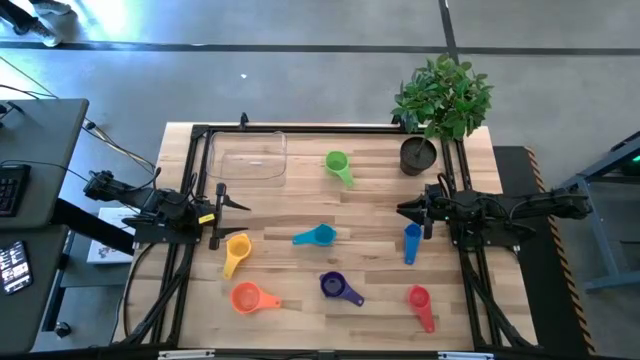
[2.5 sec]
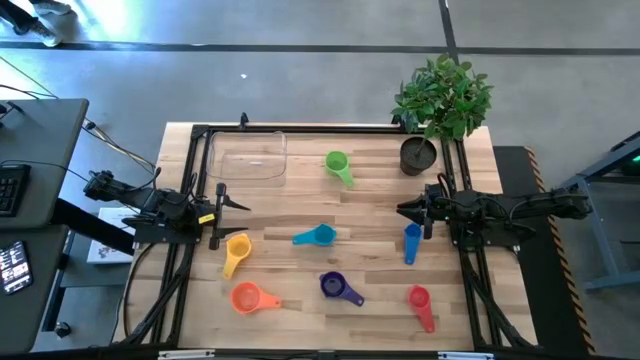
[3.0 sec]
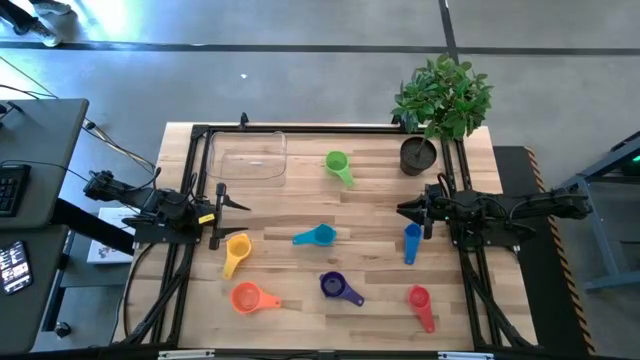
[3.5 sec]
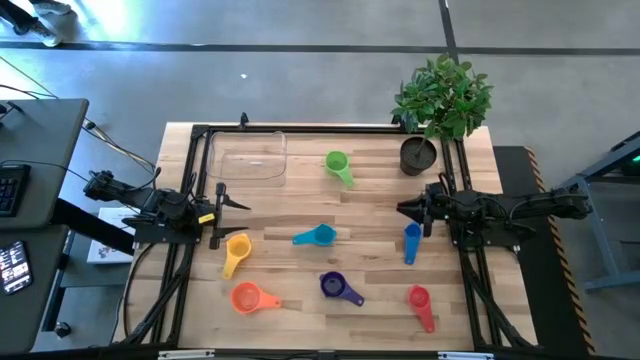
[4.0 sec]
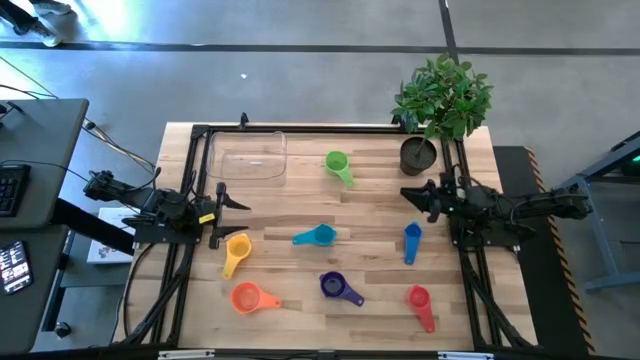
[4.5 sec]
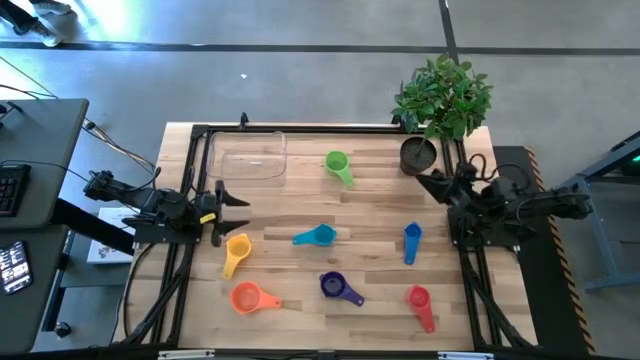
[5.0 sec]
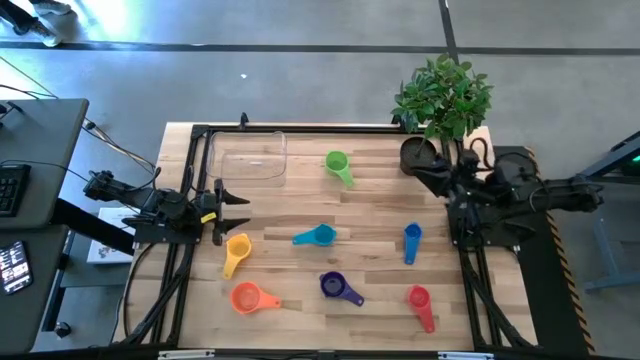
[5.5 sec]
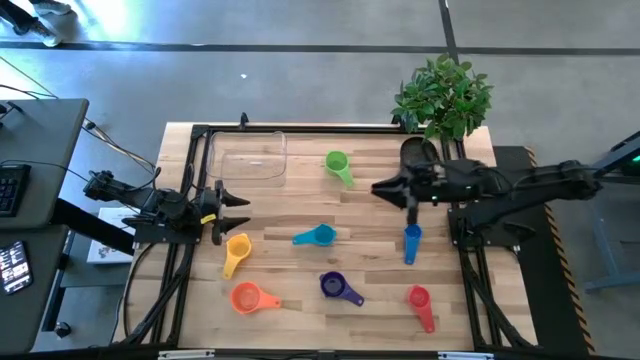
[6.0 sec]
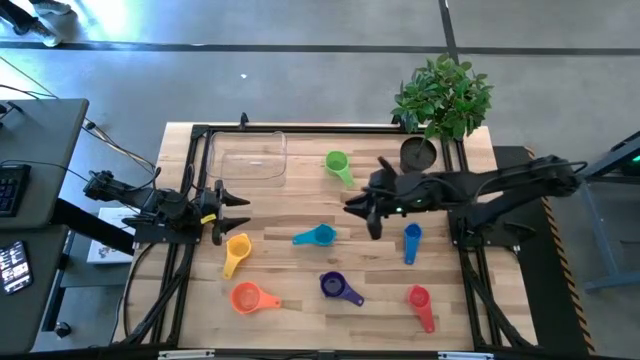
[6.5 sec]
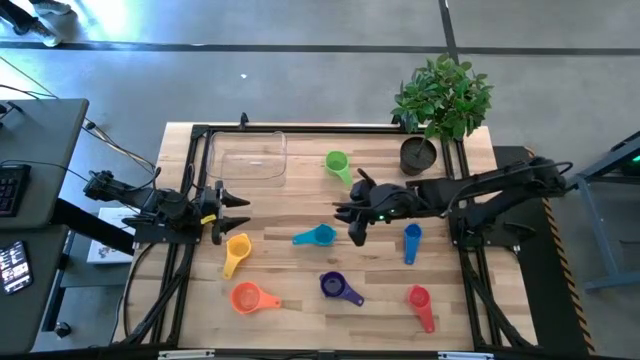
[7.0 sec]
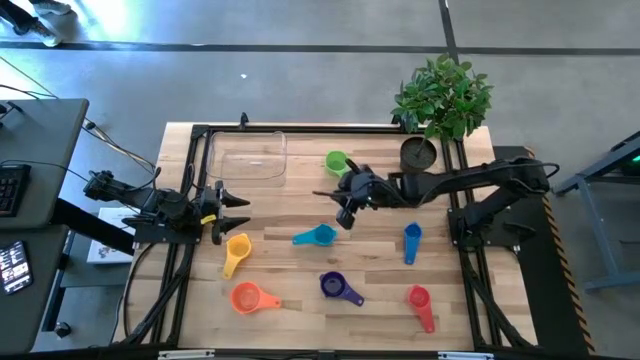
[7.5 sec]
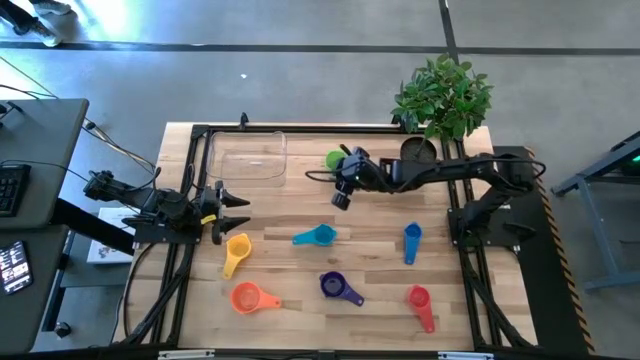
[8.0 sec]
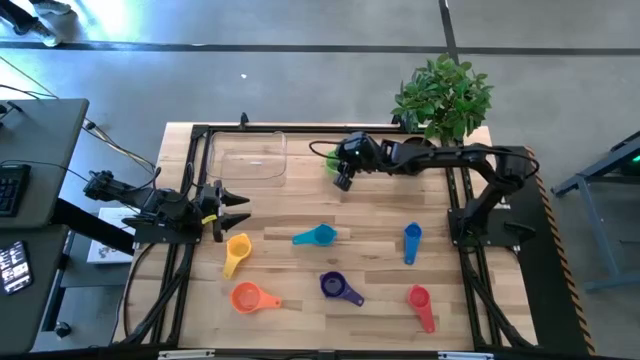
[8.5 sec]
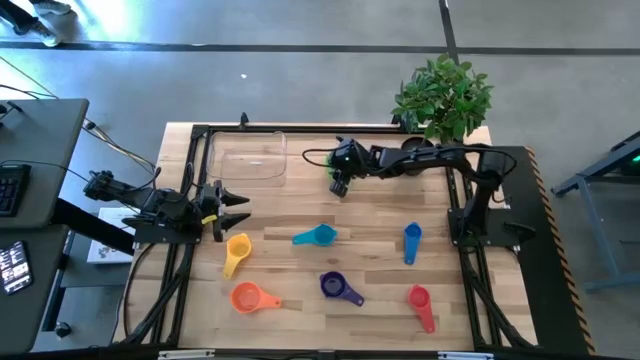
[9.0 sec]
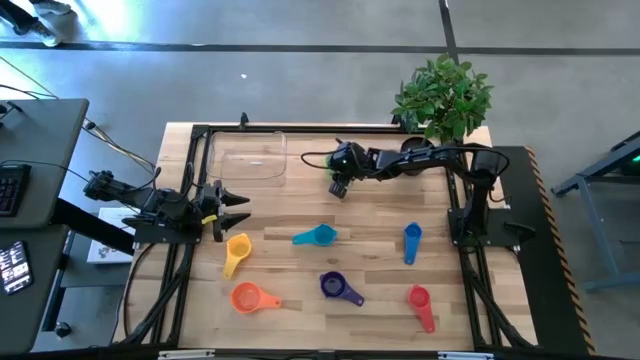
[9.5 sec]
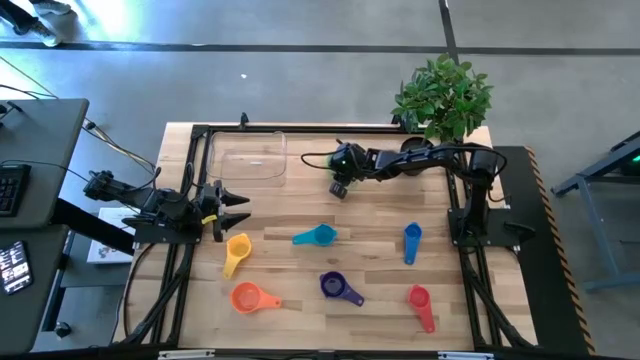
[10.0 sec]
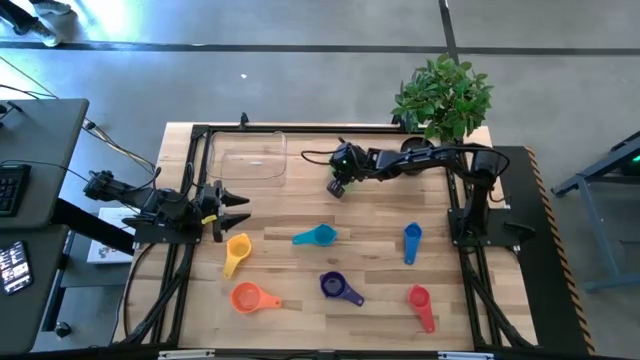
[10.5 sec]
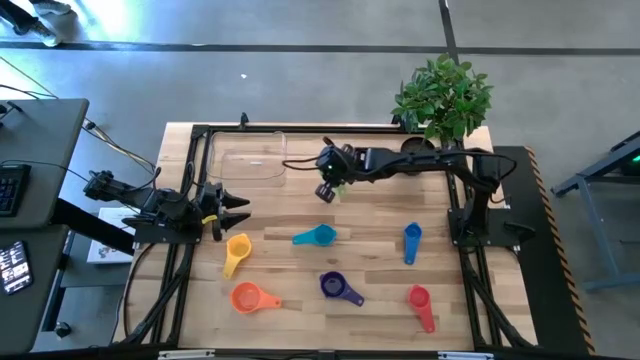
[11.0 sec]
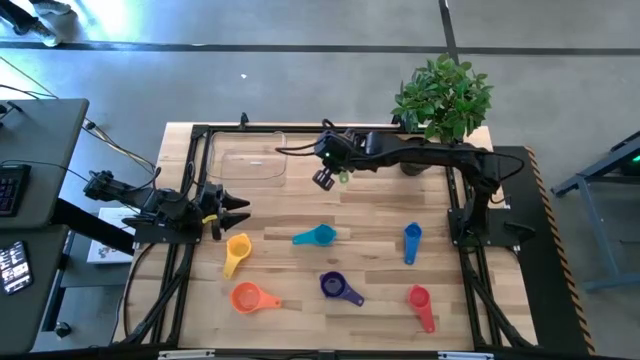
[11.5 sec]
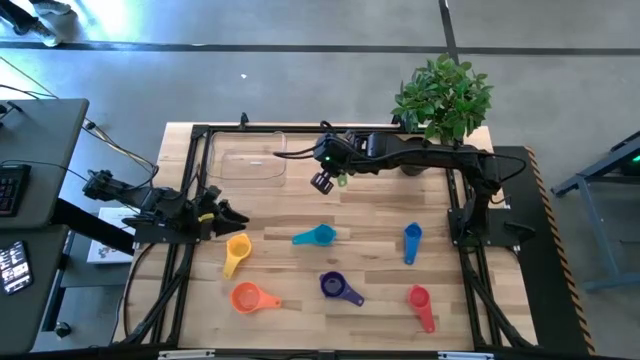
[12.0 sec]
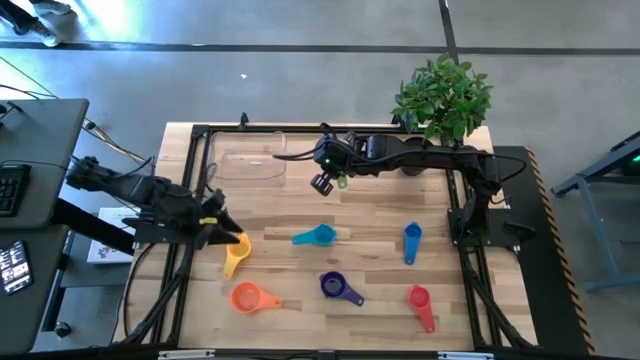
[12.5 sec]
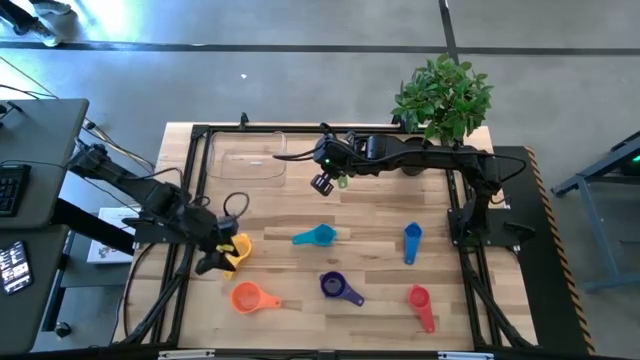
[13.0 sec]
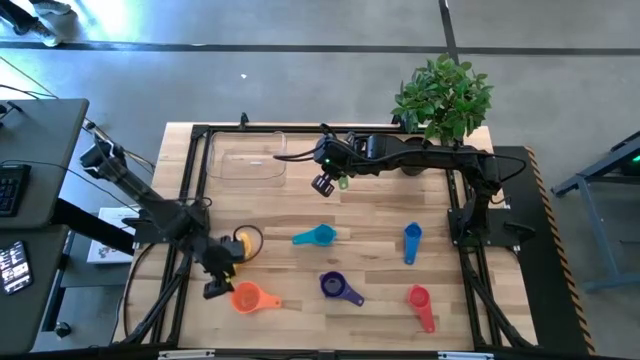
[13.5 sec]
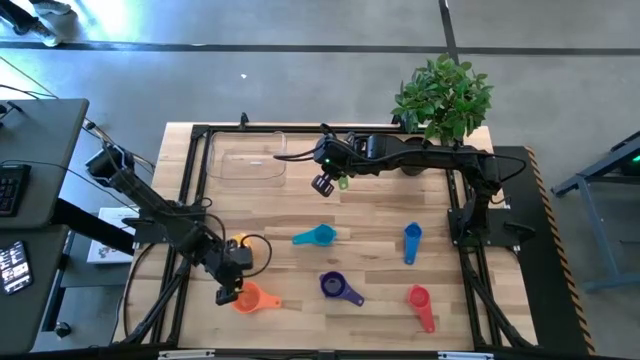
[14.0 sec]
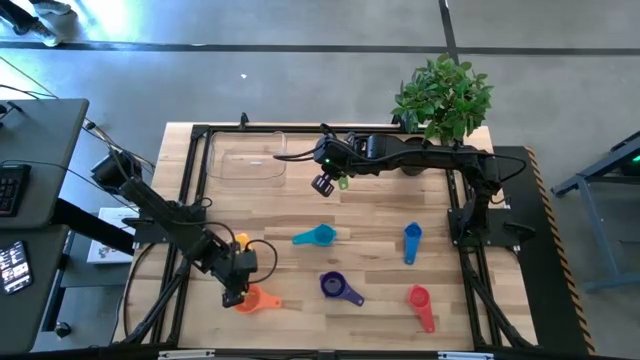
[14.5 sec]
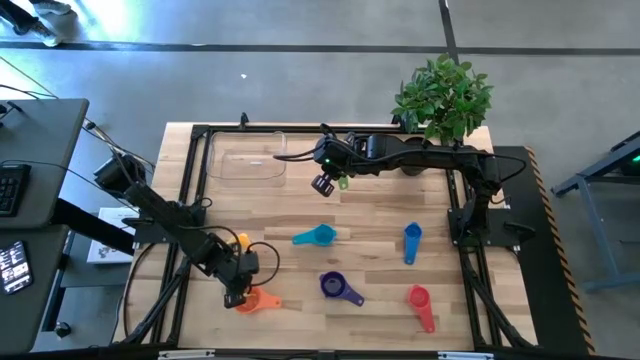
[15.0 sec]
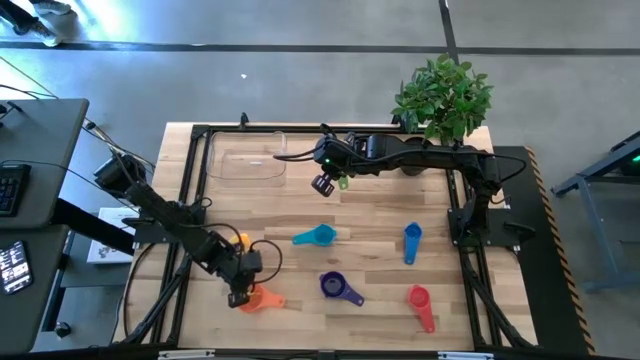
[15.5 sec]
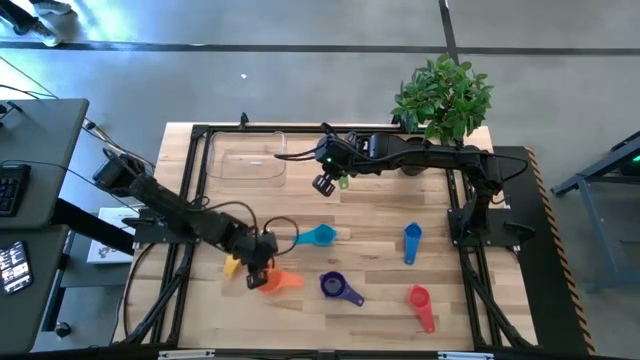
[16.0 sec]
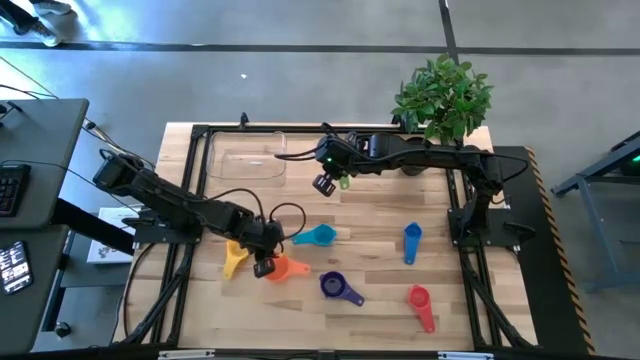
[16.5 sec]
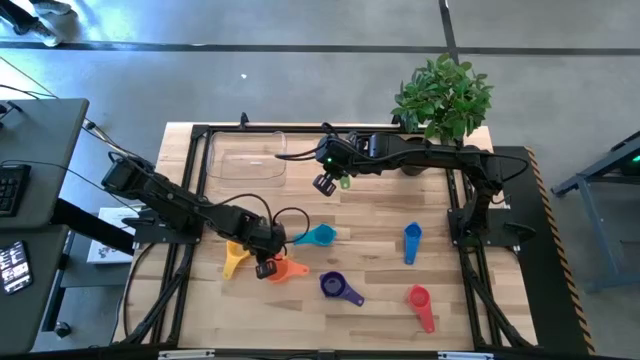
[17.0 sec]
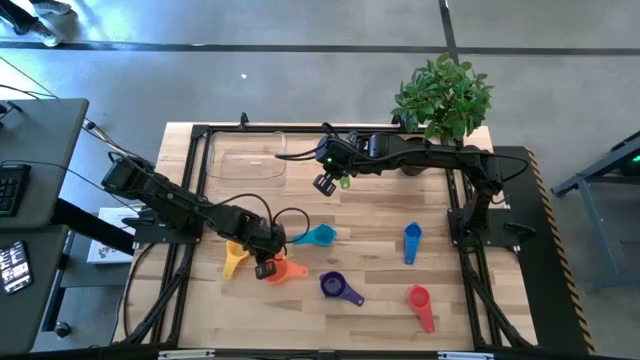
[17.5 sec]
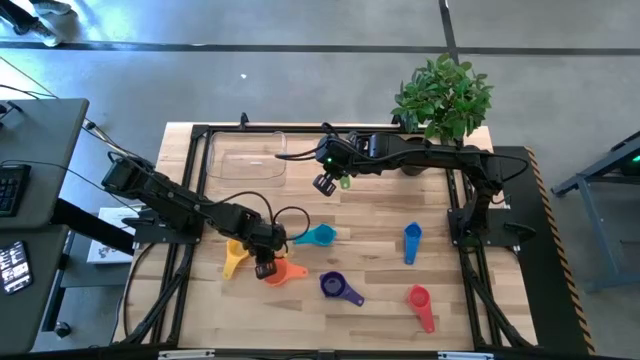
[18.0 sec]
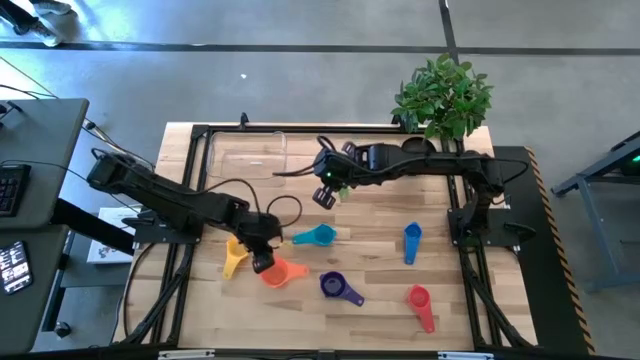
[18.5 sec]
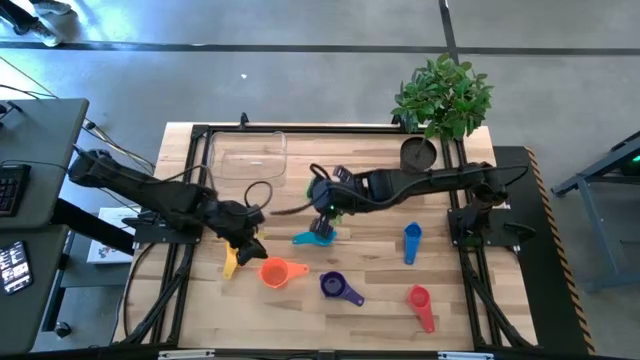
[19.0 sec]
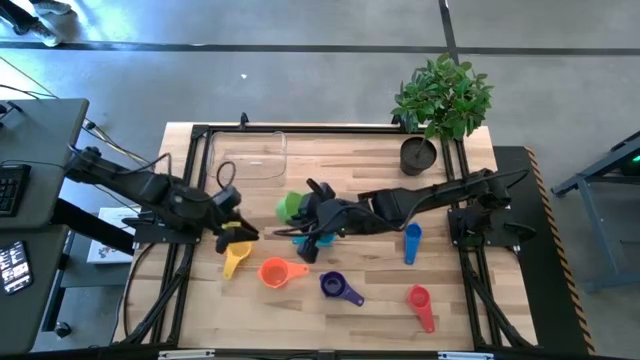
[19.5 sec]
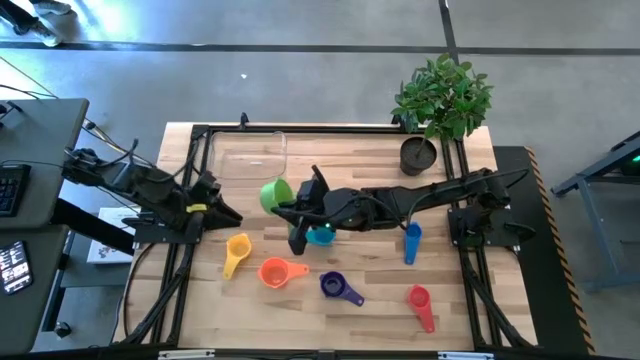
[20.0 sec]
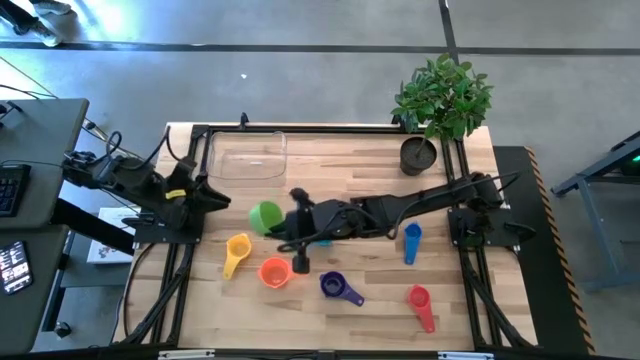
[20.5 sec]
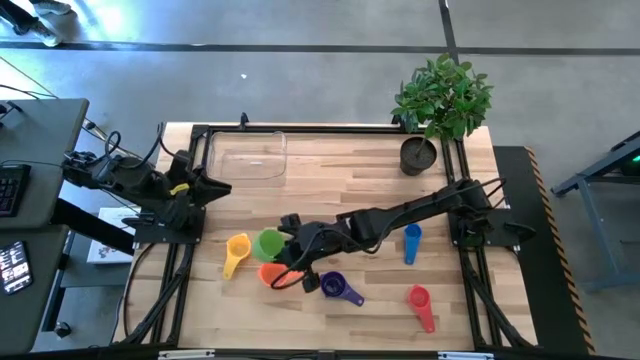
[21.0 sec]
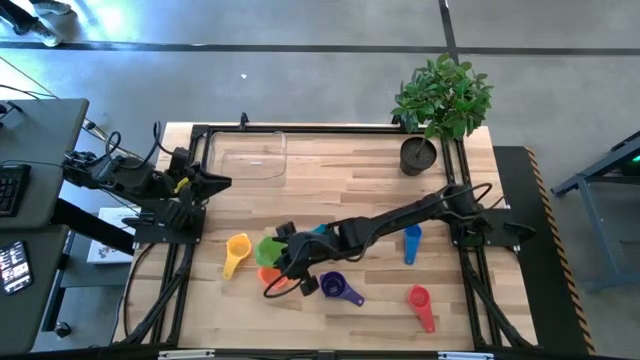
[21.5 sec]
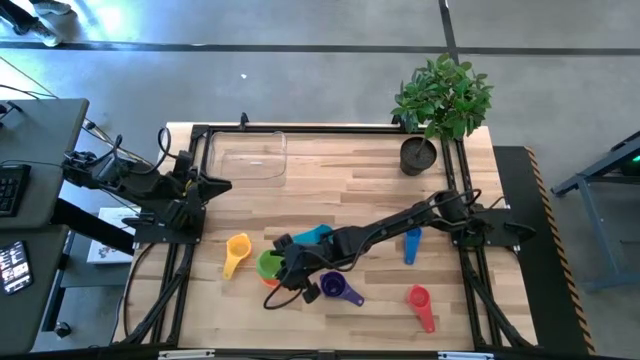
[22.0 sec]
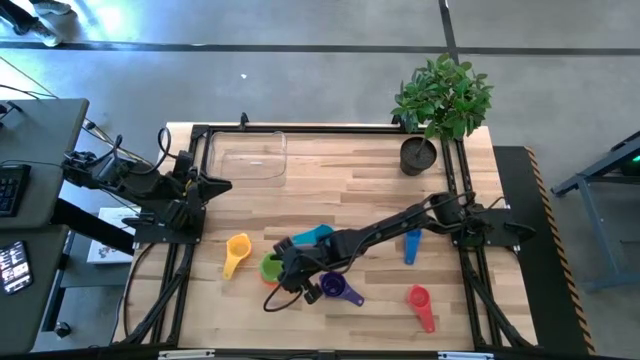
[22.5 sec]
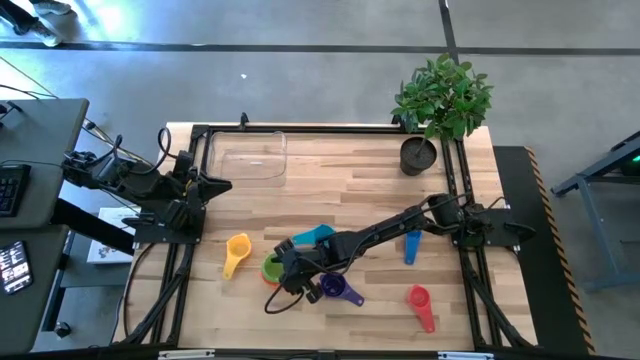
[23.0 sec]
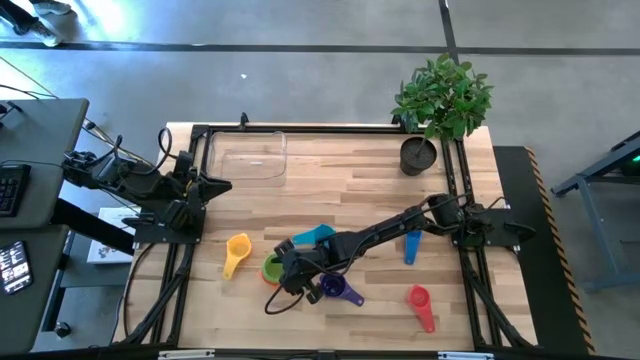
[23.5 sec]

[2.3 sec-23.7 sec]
Task: Nest measuring cups in basket
Stack the green measuring cup on top of the orange measuring cup
